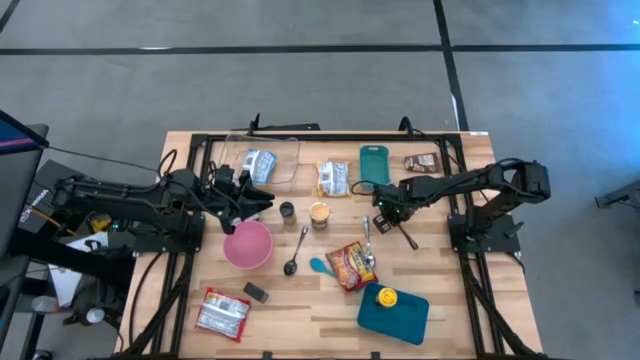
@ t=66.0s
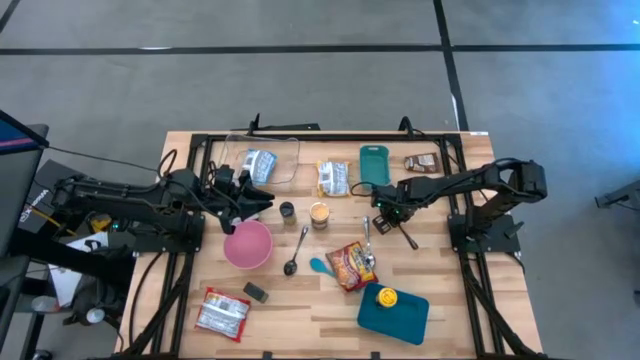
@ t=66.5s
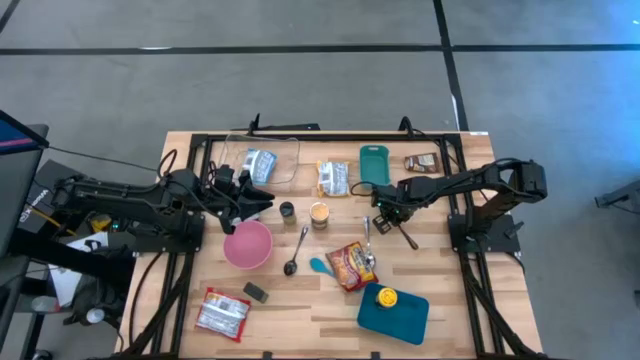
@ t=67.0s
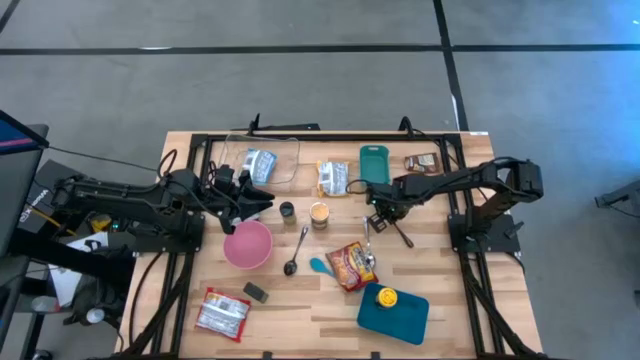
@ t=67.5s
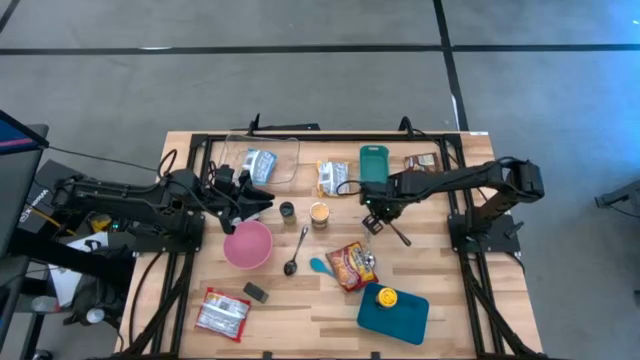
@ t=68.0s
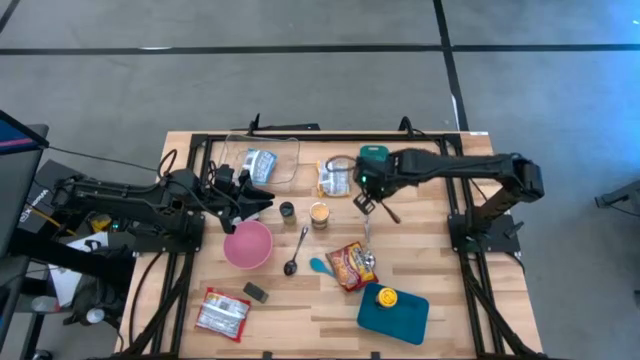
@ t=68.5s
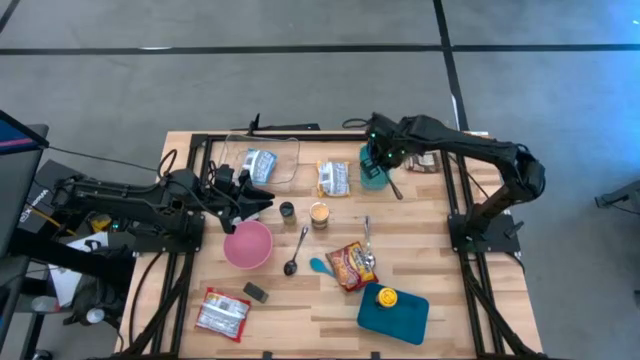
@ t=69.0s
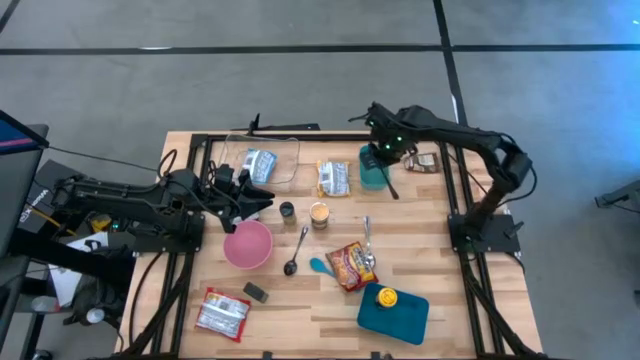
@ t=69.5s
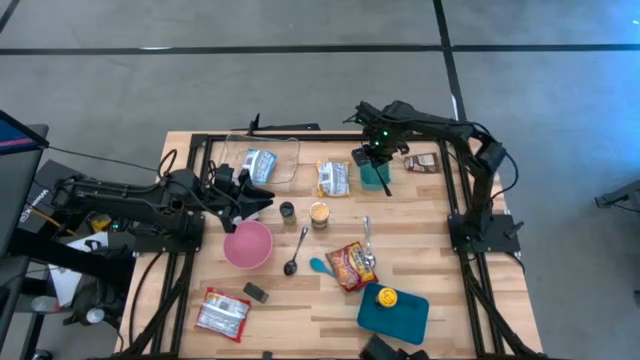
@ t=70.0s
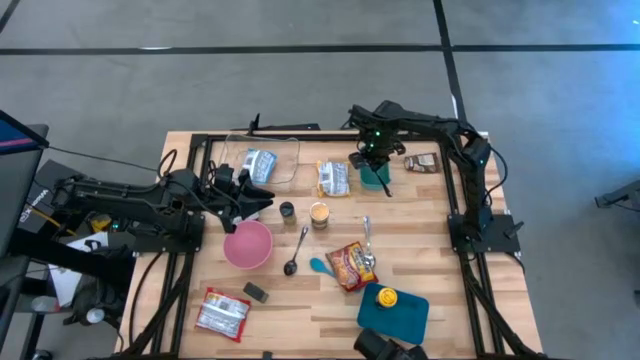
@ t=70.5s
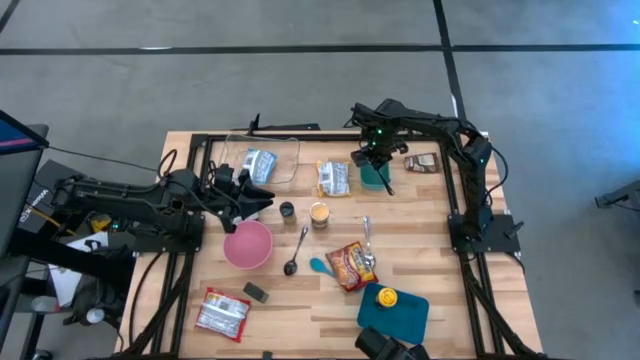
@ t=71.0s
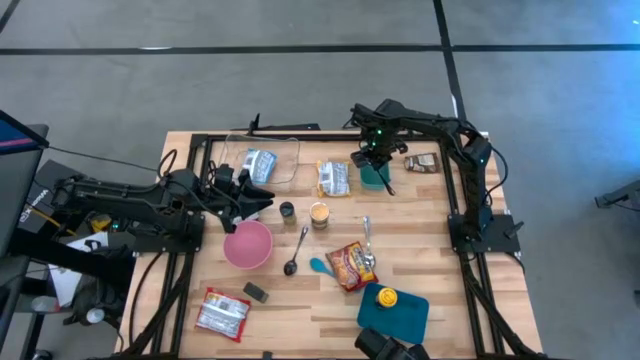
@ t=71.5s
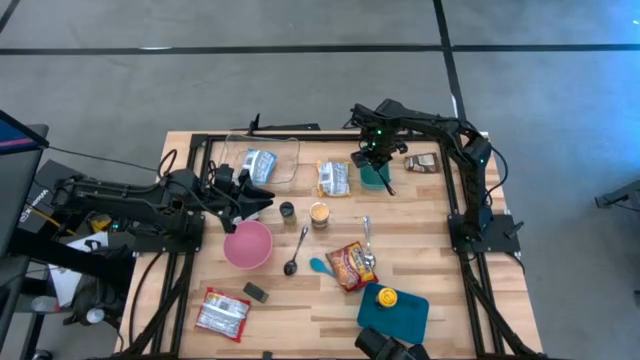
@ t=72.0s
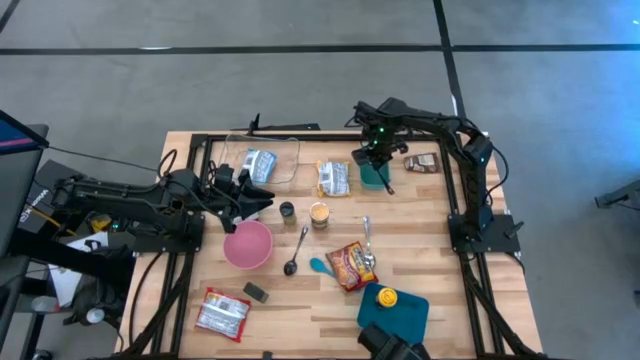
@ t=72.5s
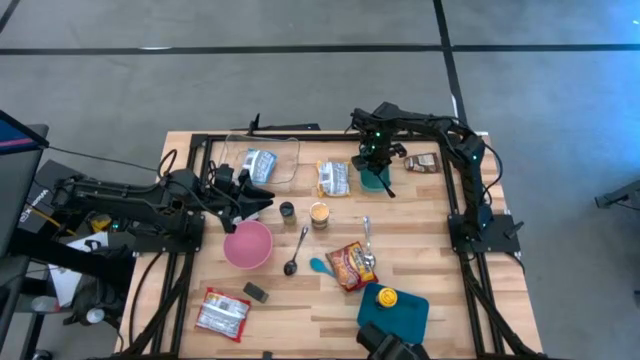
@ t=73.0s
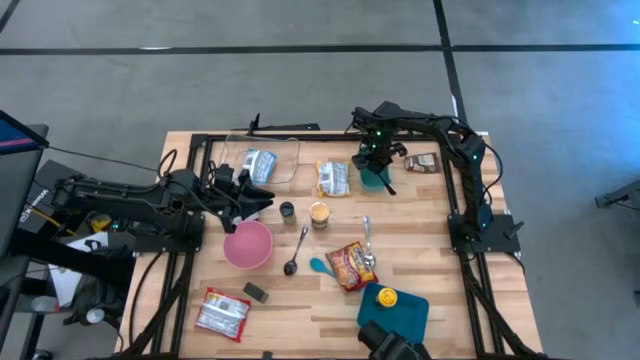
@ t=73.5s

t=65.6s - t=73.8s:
Task: Pick & Place Food Item
Put the right black spoon into the green bin

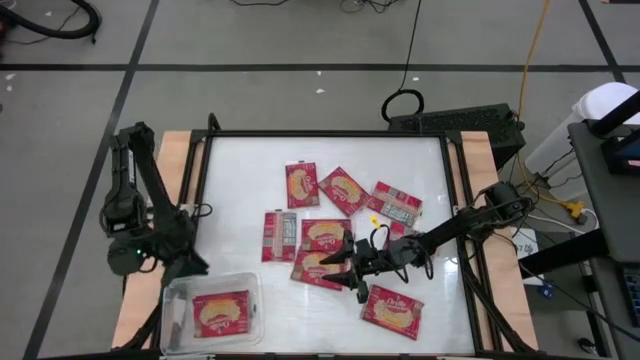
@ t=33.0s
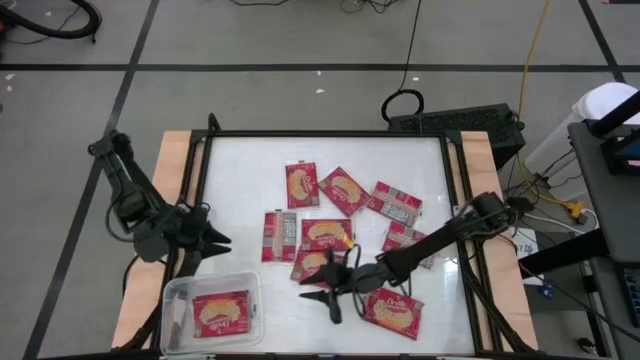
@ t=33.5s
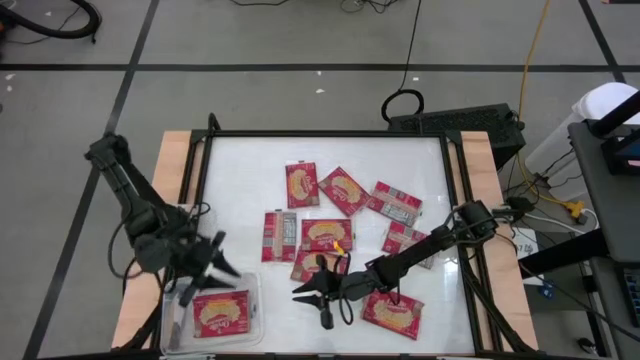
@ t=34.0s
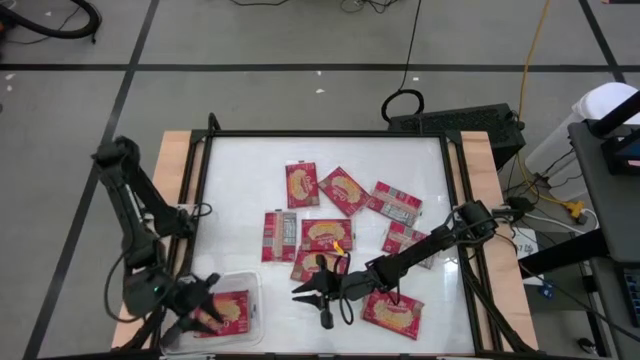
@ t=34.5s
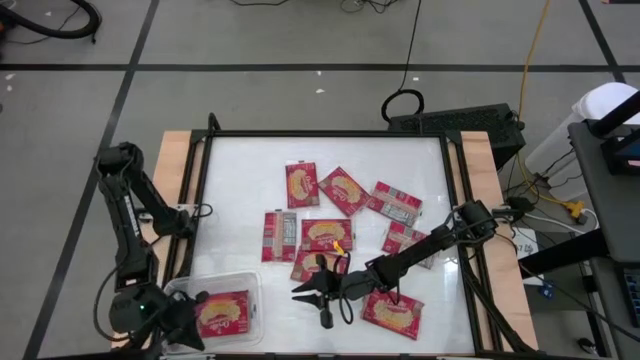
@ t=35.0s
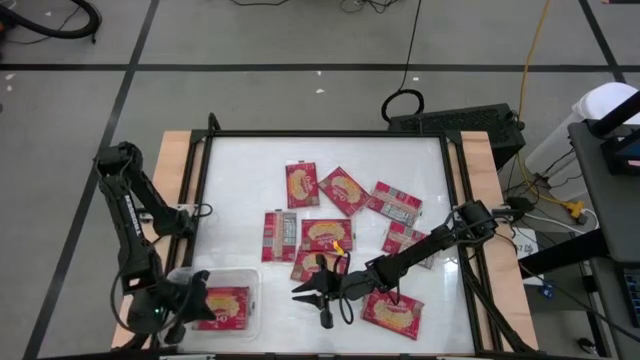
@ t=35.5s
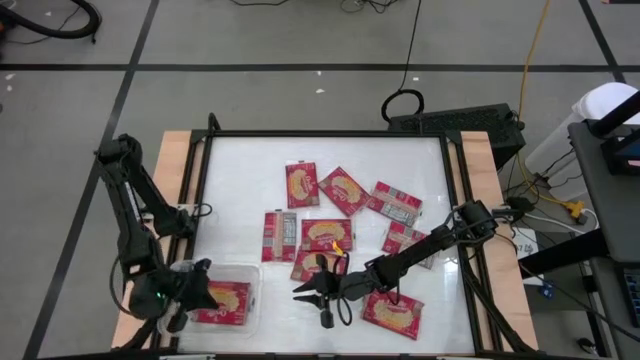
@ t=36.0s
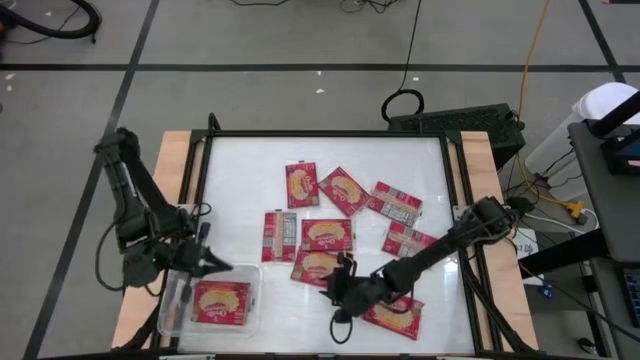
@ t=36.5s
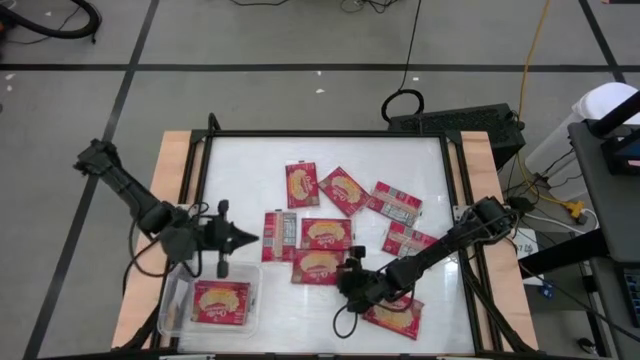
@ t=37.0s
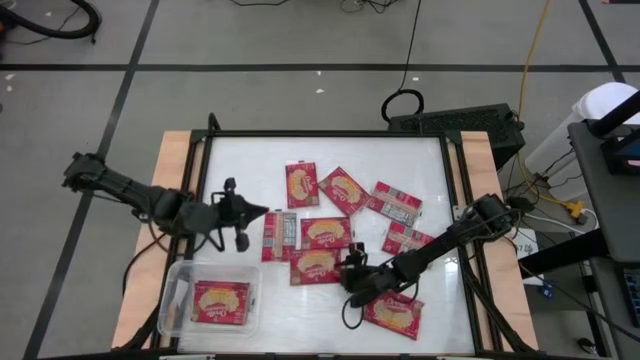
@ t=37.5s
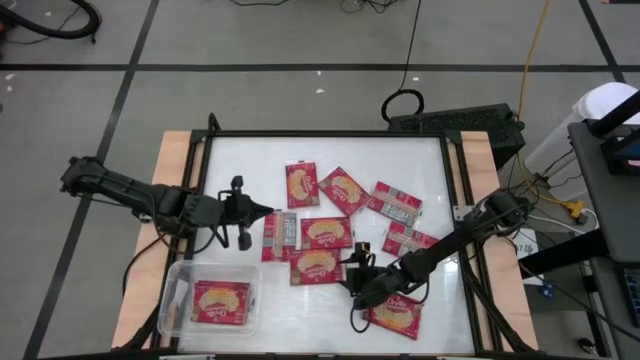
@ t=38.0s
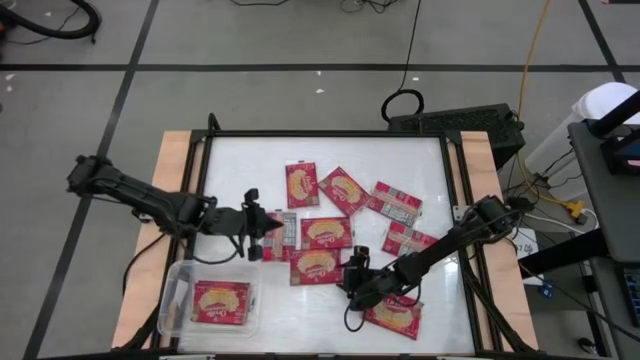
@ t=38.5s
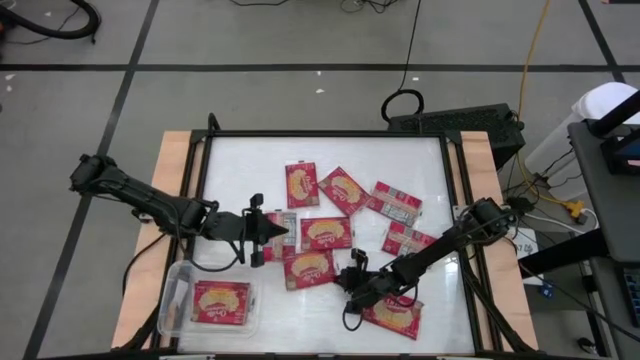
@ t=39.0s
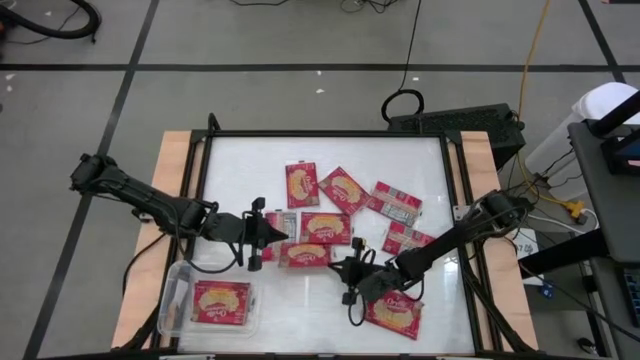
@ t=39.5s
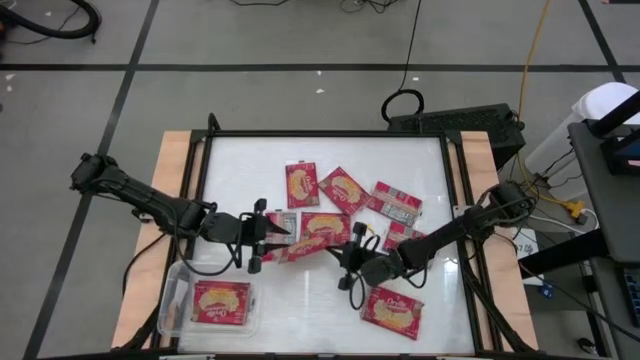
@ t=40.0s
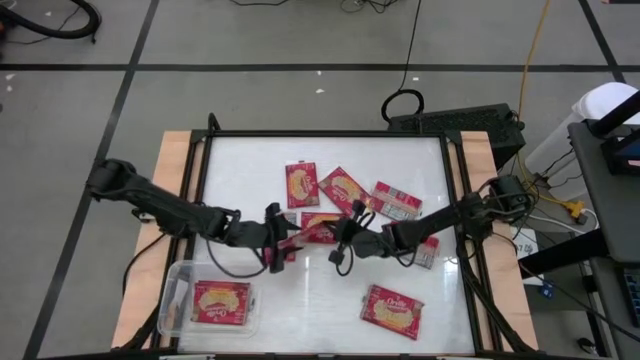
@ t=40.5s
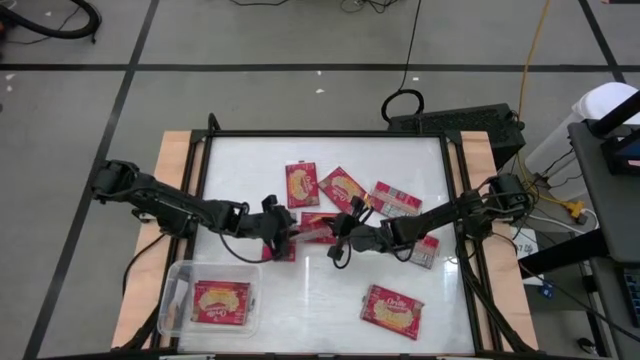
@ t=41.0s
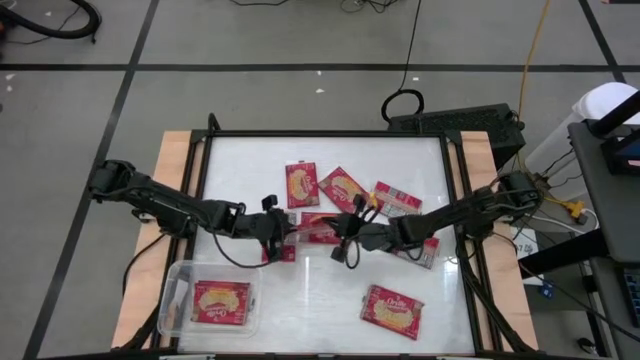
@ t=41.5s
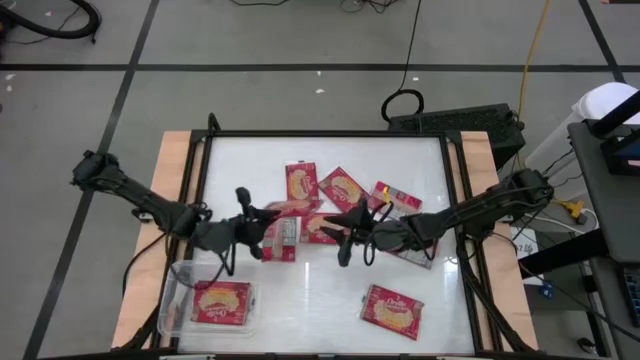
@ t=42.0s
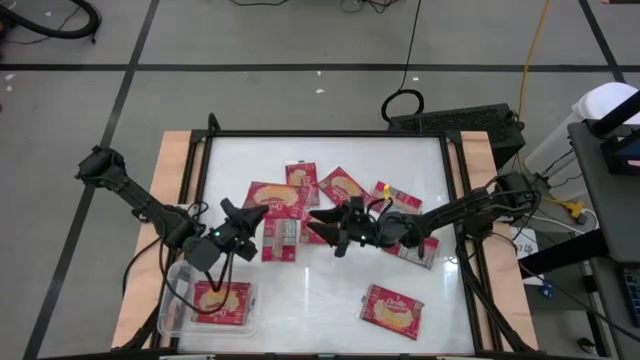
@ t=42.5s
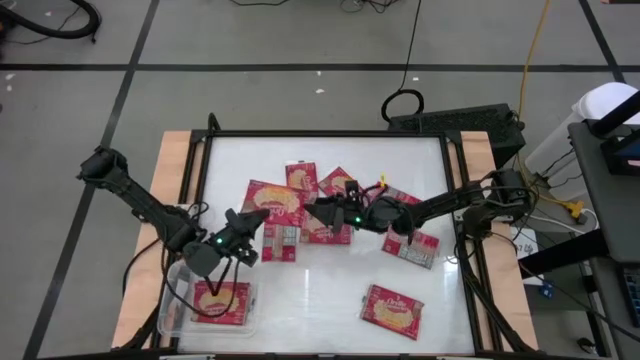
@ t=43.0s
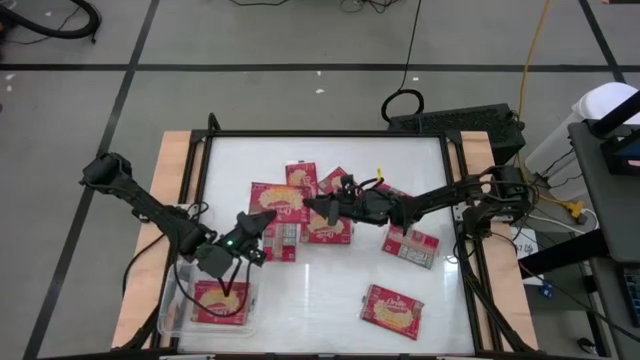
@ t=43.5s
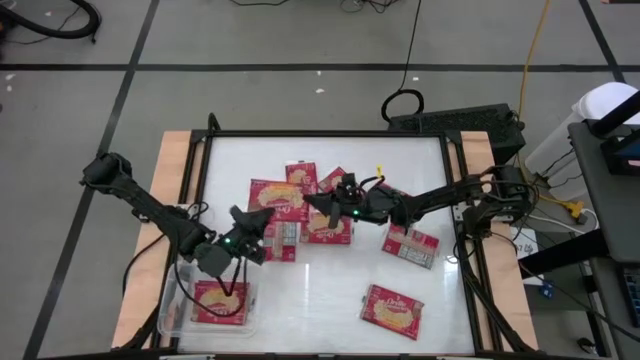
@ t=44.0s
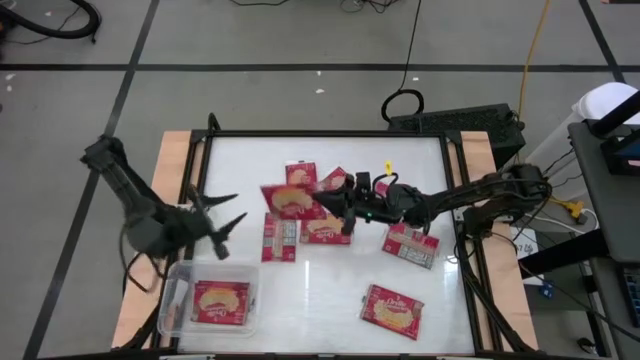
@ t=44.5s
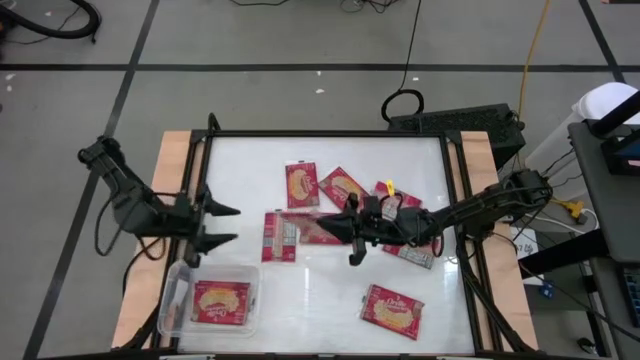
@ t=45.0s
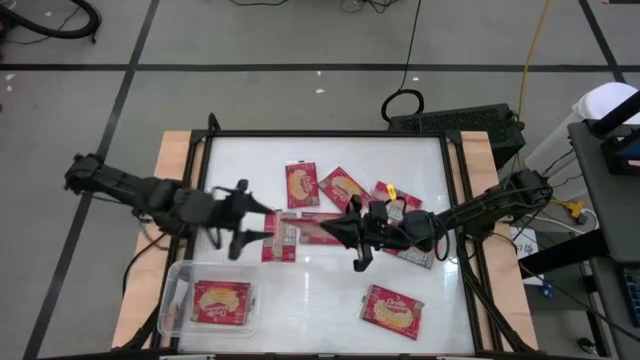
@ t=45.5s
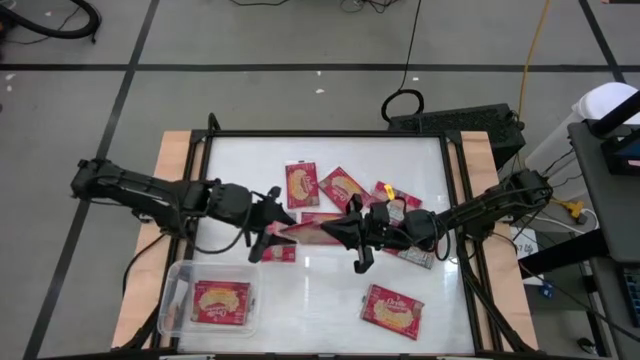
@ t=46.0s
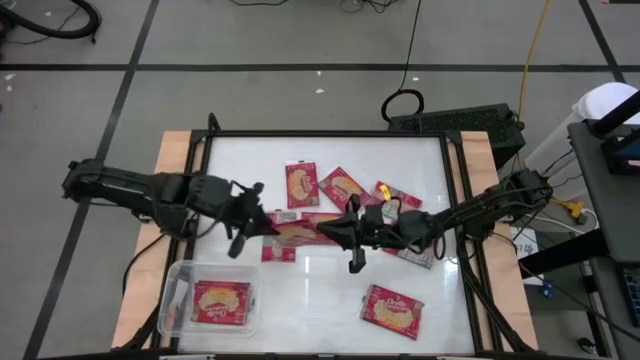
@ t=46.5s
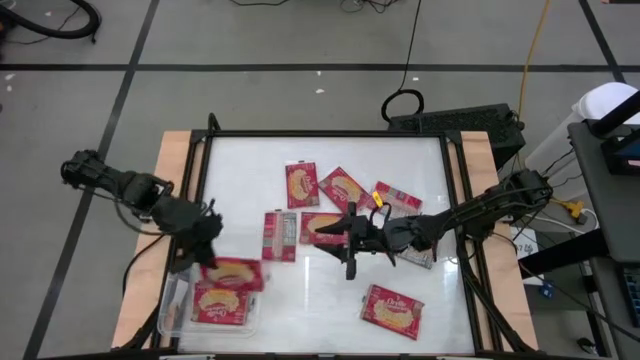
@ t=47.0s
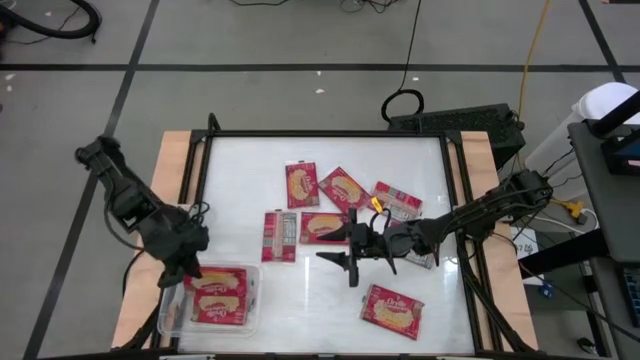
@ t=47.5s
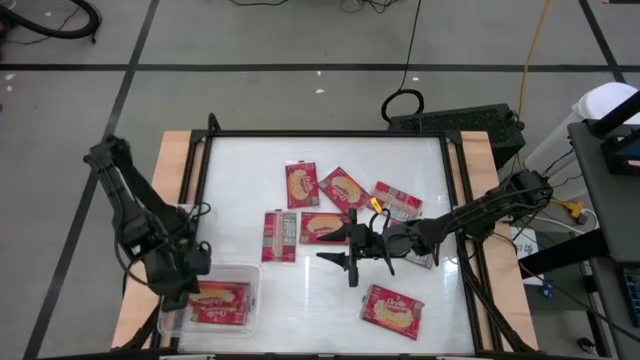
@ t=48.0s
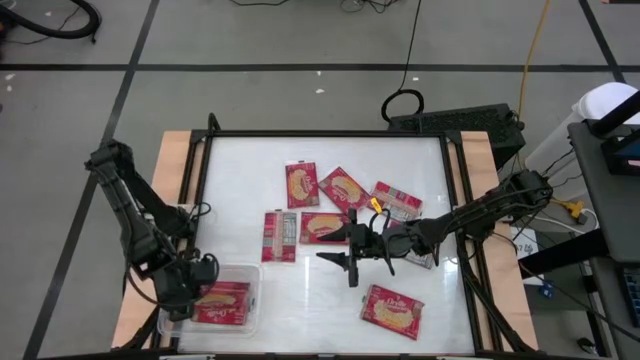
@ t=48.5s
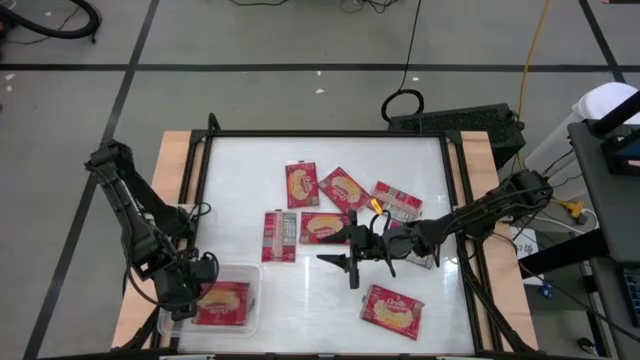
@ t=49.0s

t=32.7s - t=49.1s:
Task: Sort popcorn bags into baskets
Put the popcorn bag into the transparent bin
